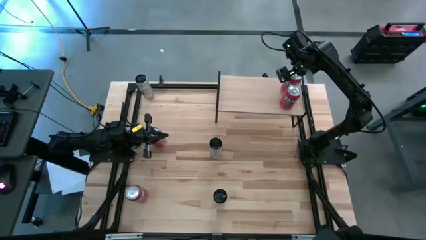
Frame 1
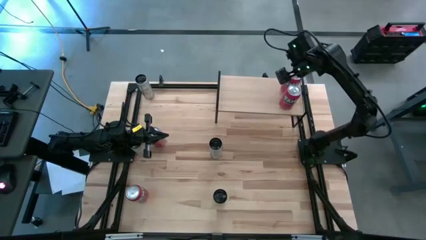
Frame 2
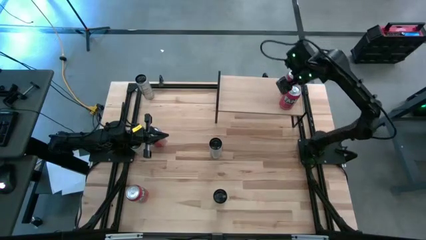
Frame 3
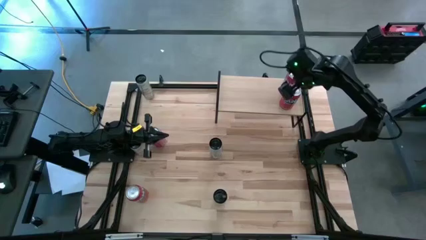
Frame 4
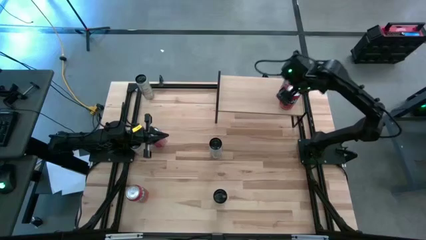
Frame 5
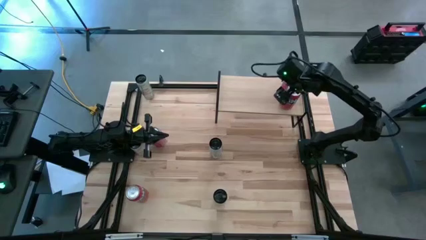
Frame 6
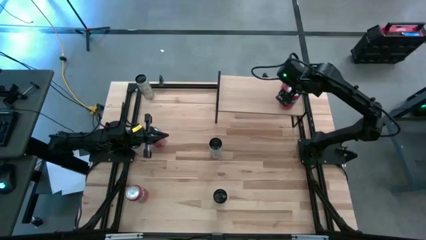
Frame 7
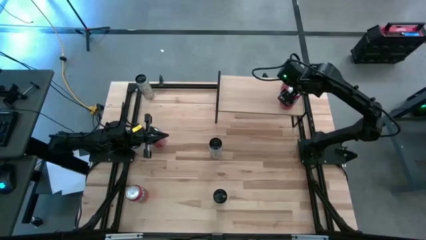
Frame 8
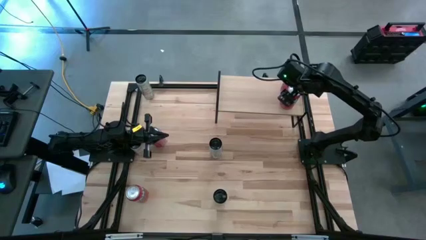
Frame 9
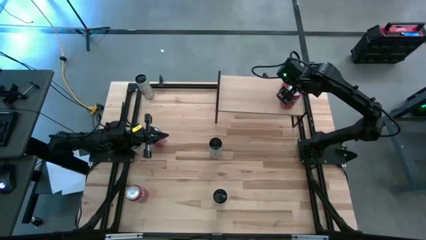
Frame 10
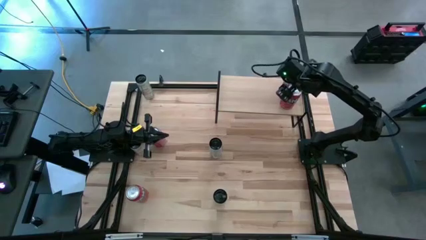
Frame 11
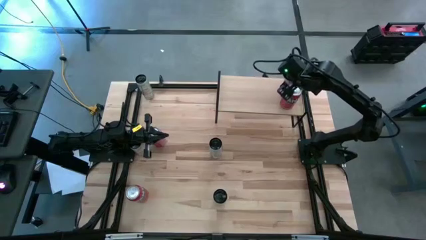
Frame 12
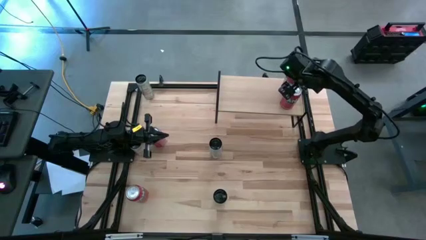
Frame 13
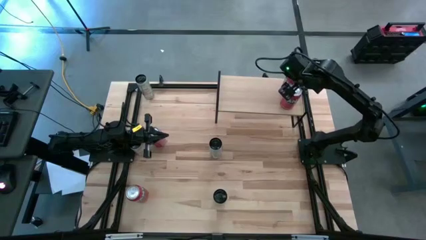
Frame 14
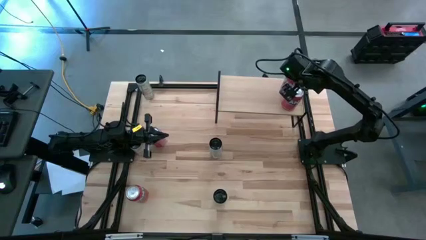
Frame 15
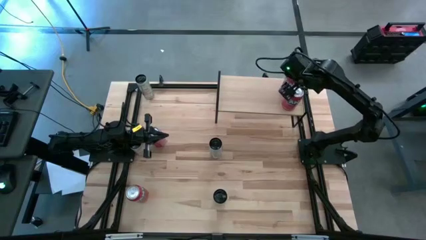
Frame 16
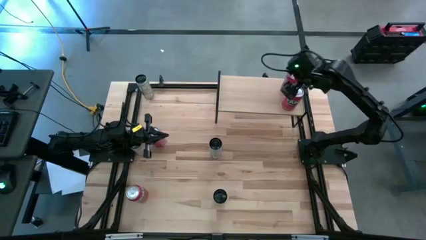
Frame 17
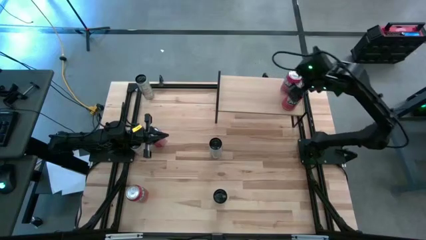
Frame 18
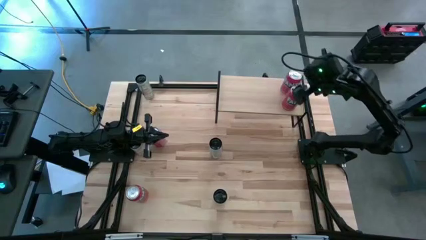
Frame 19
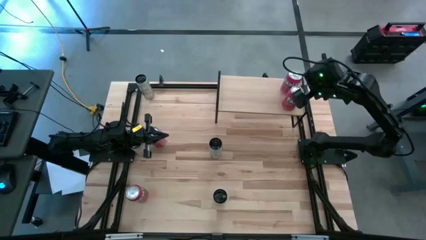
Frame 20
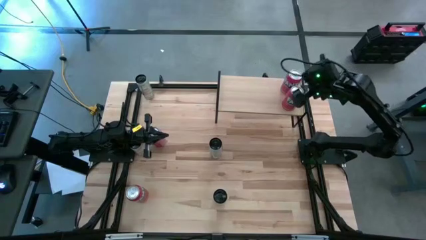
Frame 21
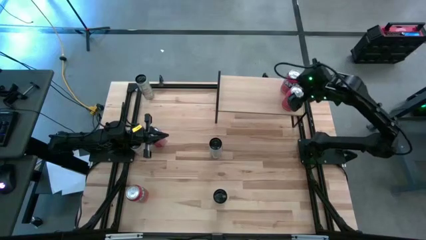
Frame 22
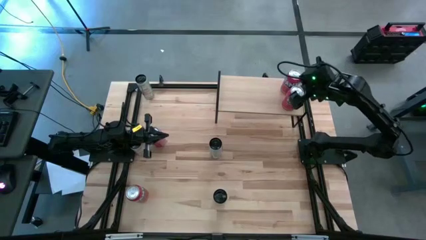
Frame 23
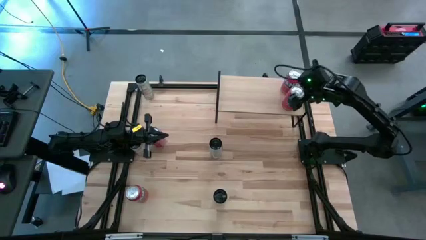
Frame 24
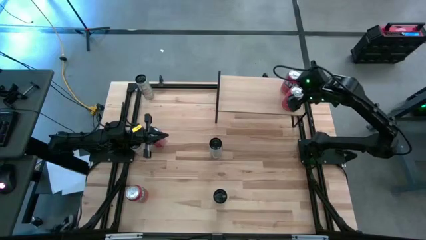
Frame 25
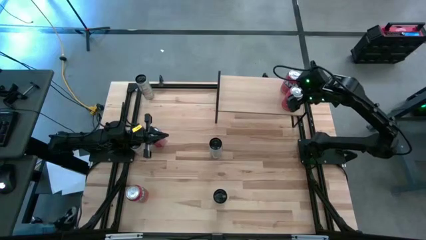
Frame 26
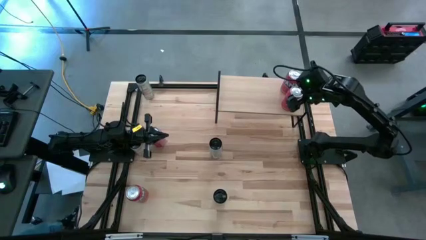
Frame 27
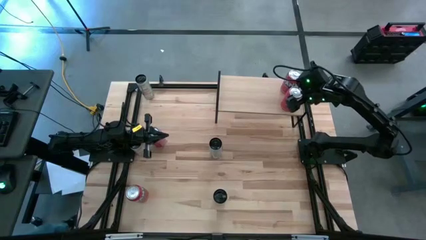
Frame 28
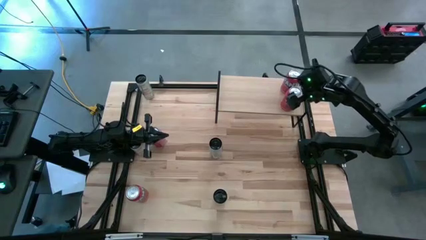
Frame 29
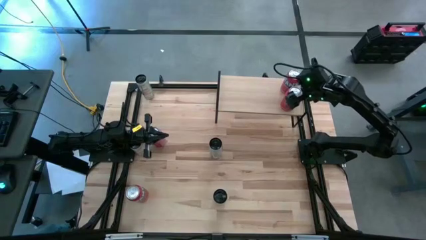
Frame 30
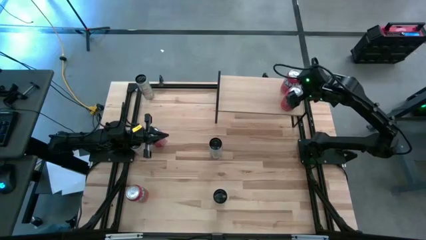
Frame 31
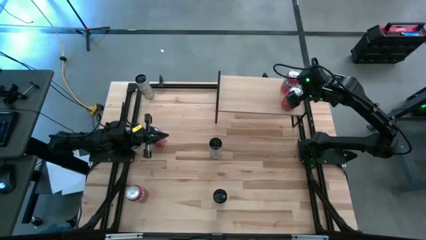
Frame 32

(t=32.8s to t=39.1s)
Task: Place canned beverage on shelf
Adjust the orange soda can

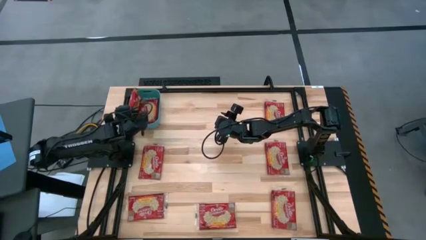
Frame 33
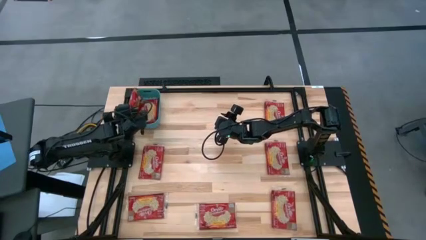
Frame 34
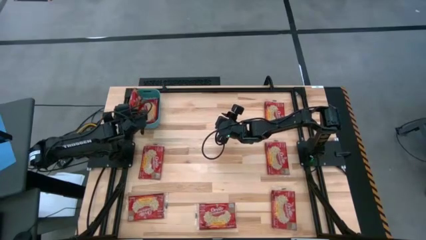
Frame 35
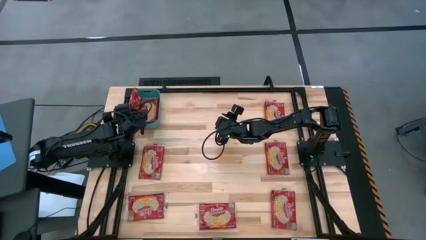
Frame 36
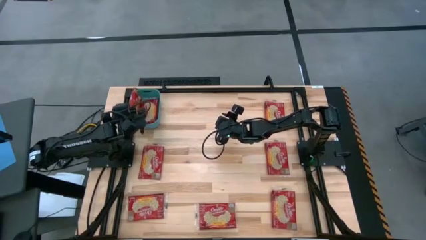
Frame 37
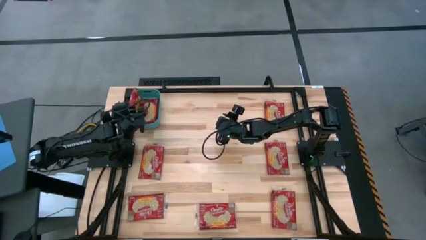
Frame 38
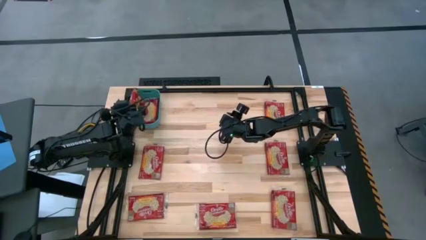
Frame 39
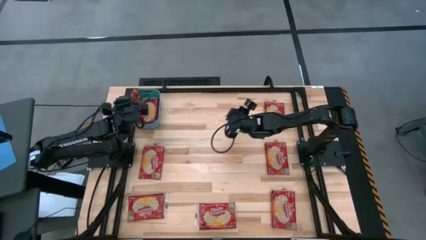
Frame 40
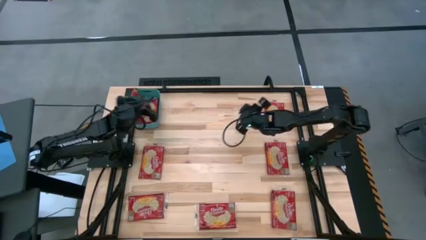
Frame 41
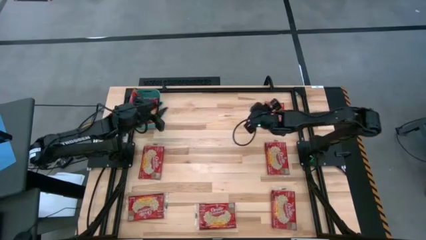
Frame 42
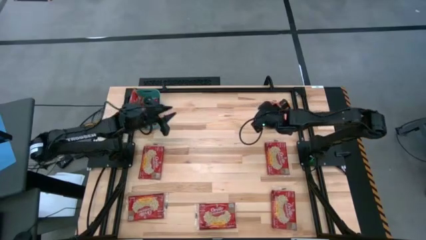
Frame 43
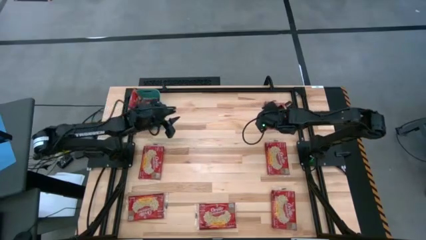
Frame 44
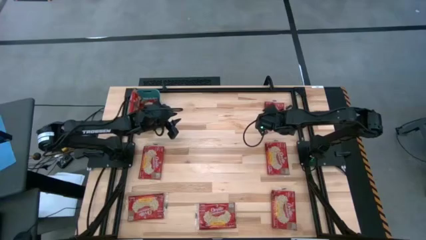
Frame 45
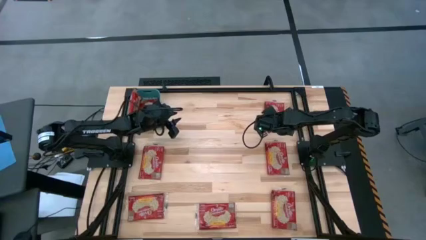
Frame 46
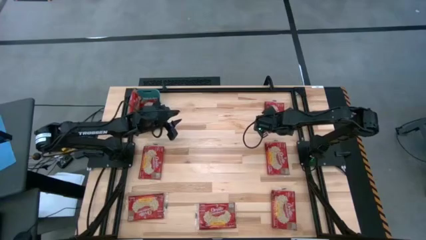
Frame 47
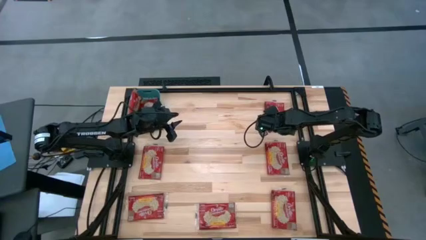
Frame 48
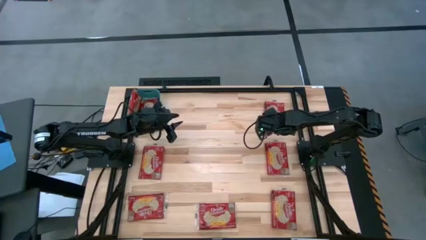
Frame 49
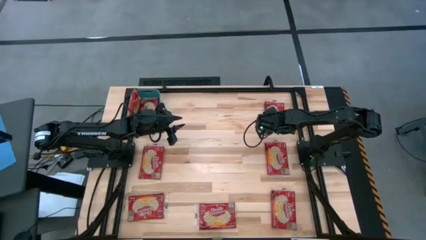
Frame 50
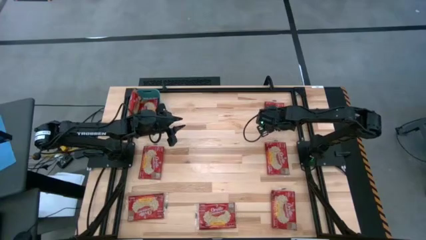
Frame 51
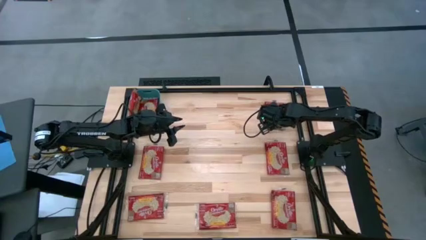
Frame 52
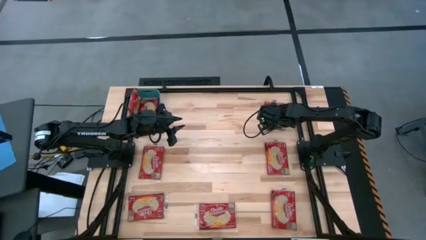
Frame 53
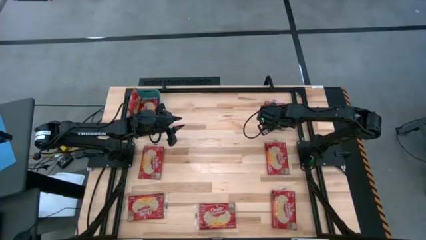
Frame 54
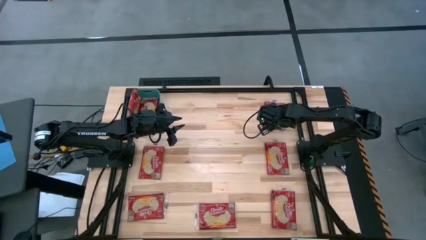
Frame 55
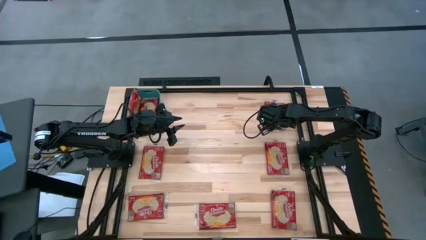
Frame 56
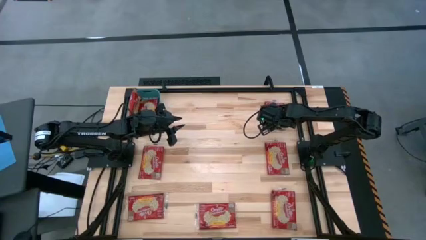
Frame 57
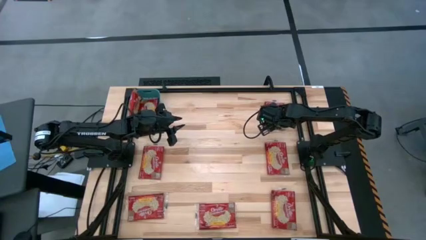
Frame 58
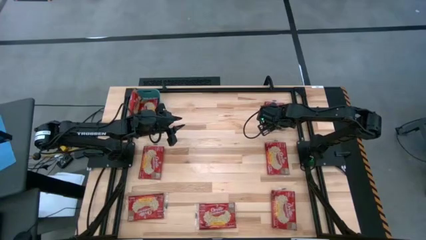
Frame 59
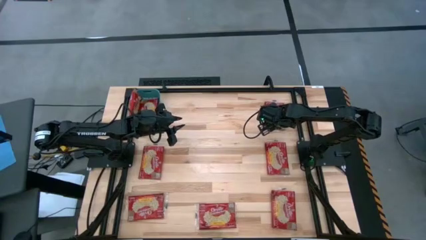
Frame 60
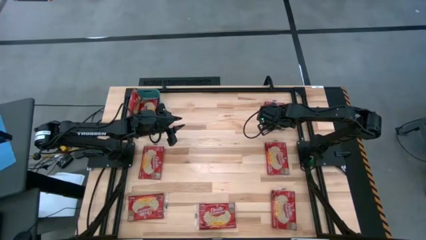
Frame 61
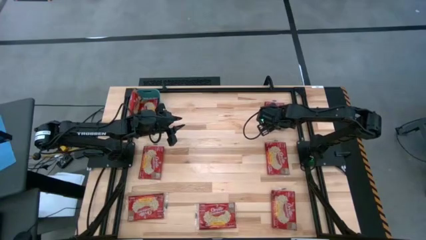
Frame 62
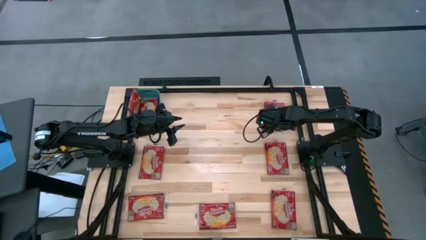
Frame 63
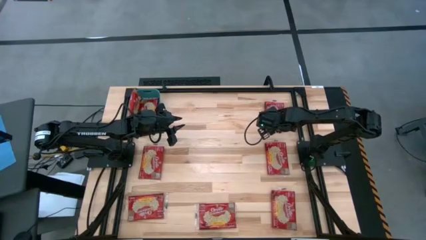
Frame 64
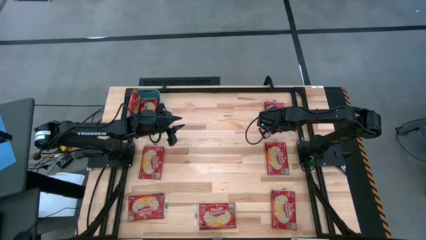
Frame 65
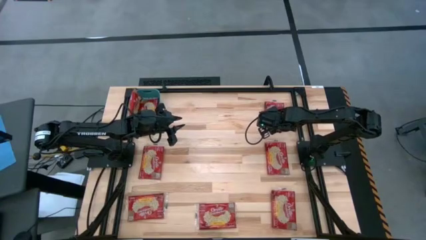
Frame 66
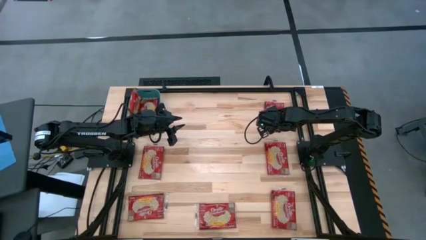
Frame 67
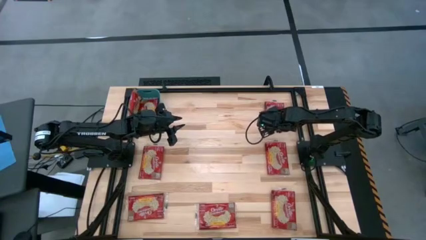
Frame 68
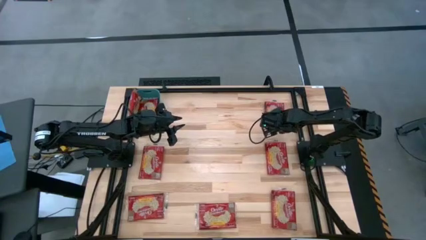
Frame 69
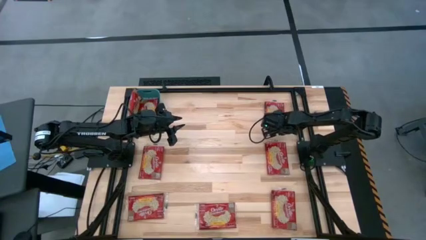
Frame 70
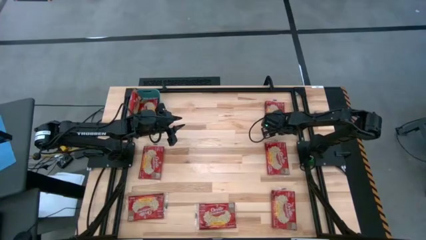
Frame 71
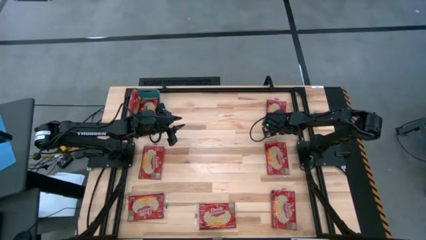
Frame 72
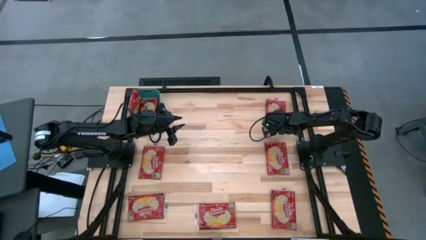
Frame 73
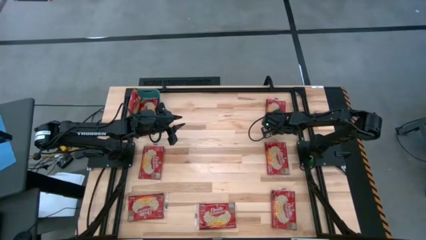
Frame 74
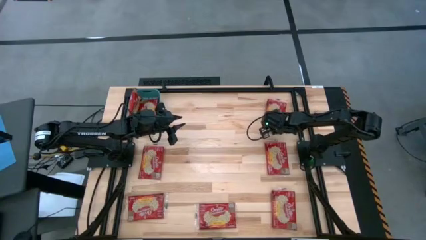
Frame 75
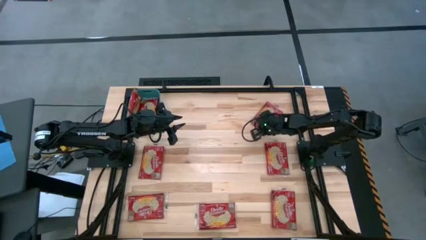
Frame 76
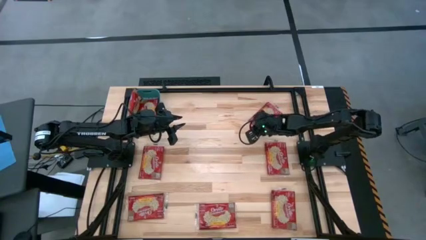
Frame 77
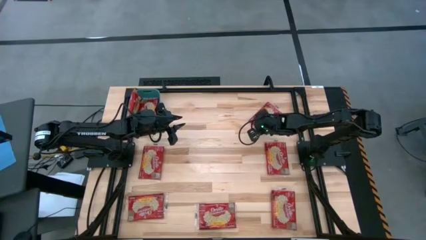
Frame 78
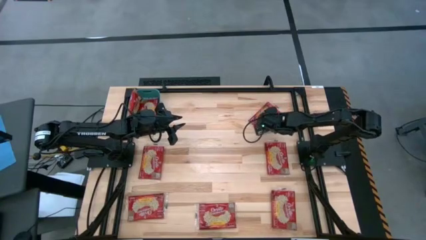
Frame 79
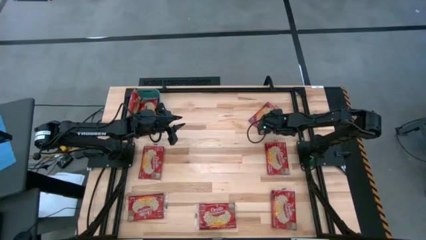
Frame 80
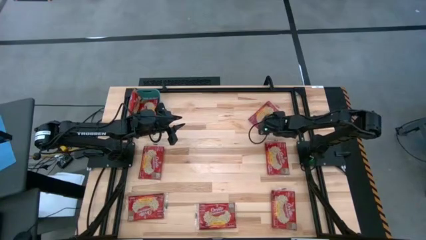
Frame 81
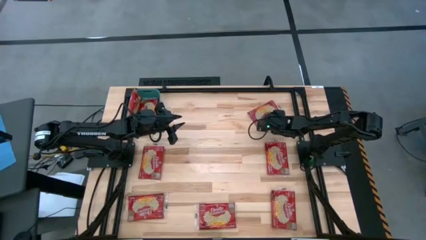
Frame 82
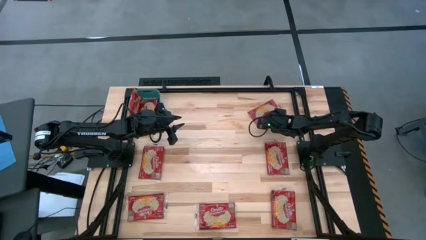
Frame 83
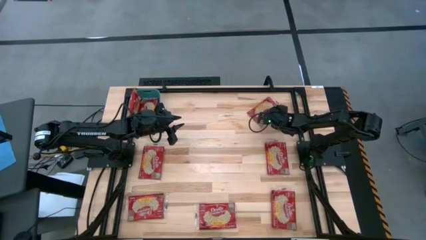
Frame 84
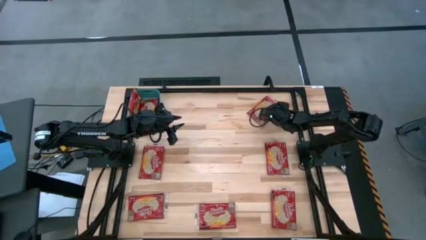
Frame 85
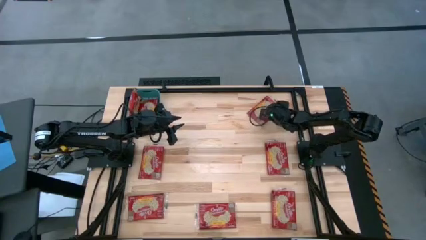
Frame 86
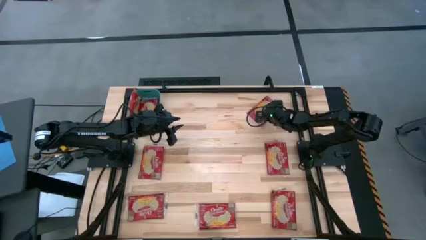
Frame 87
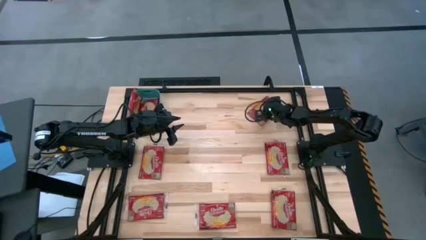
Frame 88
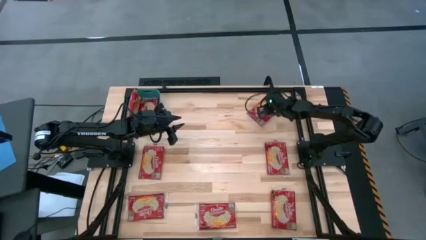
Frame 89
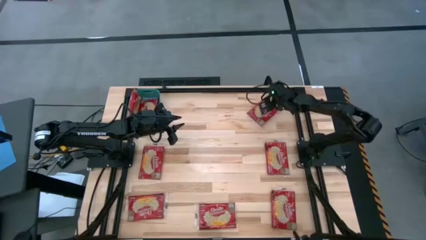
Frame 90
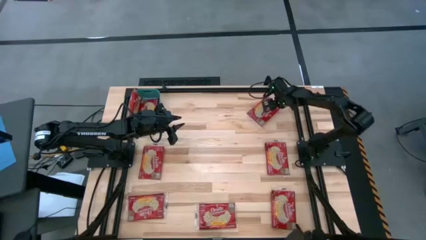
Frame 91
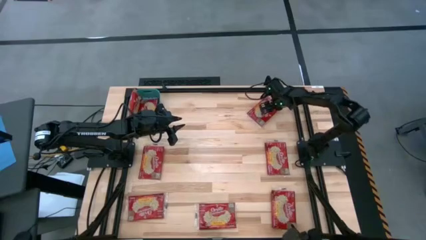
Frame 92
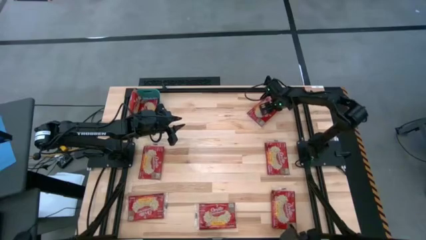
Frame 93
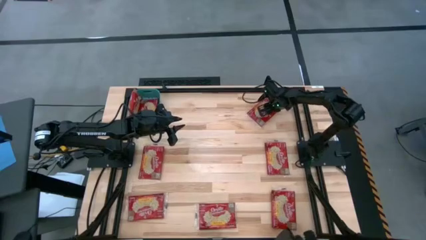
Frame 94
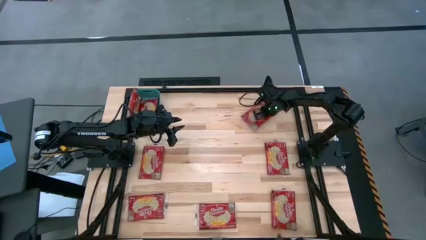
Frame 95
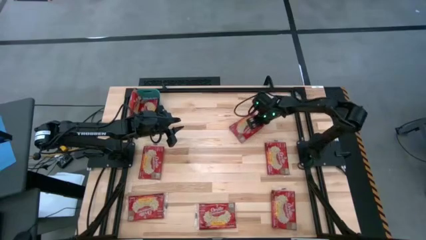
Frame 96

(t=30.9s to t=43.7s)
Task: Sort popcorn bags into baskets
Put the red popcorn bag in the blue bin
